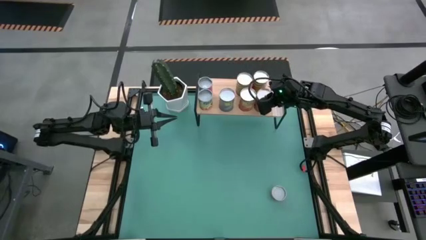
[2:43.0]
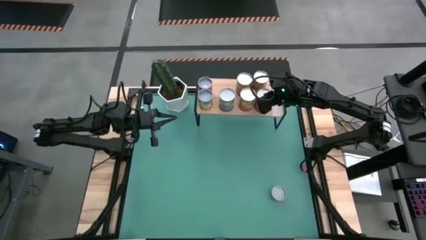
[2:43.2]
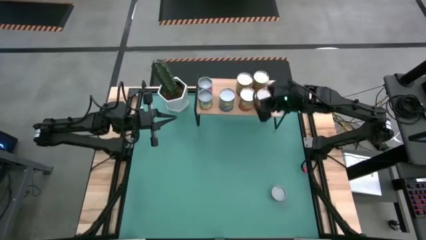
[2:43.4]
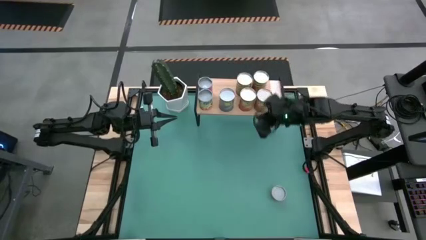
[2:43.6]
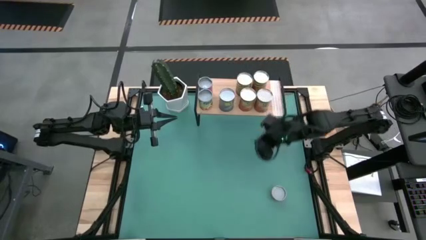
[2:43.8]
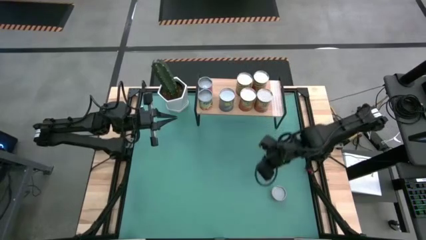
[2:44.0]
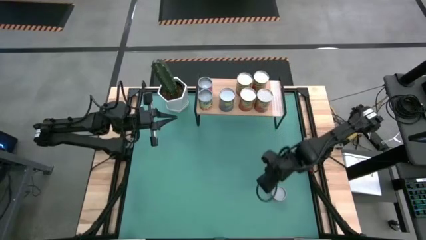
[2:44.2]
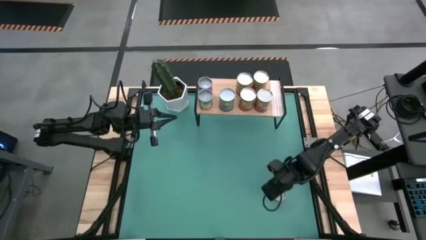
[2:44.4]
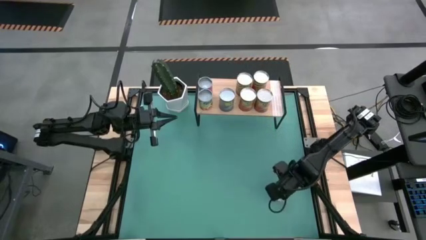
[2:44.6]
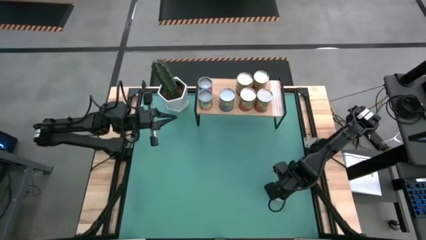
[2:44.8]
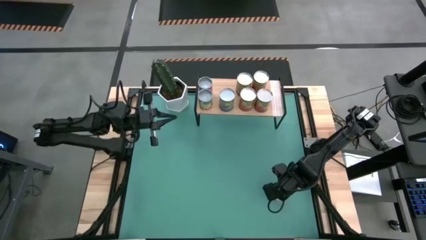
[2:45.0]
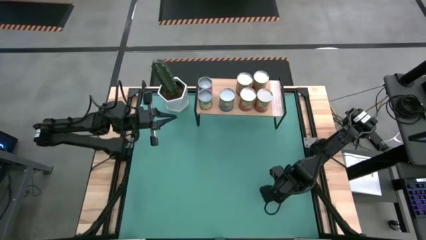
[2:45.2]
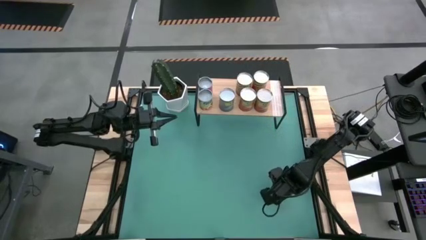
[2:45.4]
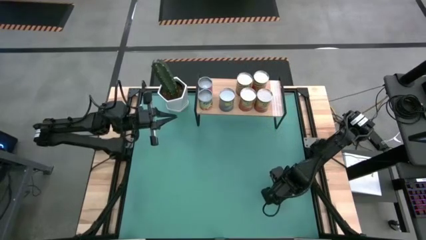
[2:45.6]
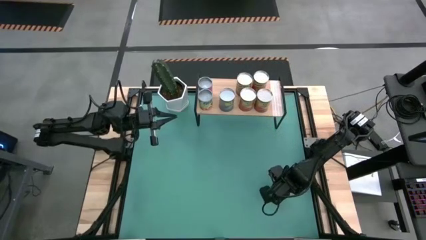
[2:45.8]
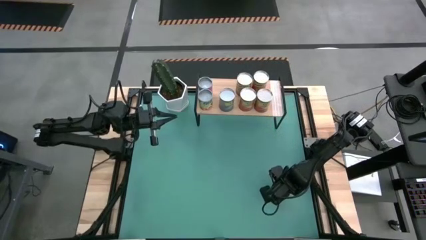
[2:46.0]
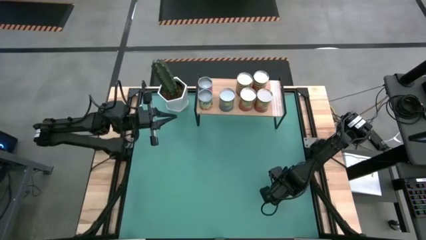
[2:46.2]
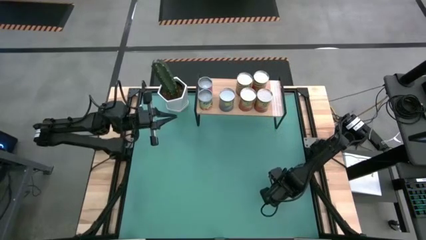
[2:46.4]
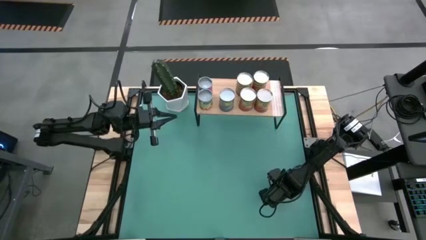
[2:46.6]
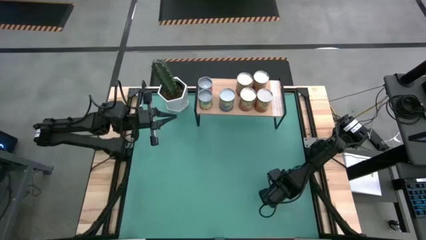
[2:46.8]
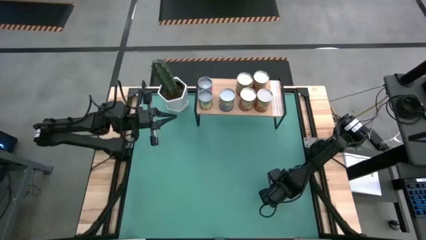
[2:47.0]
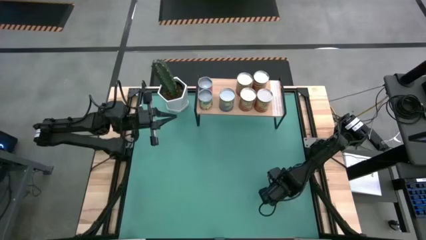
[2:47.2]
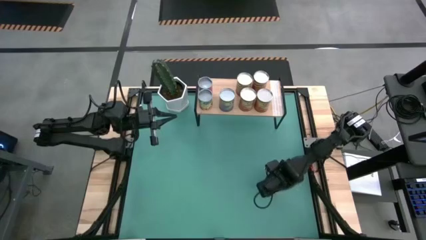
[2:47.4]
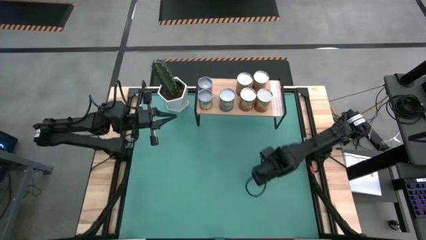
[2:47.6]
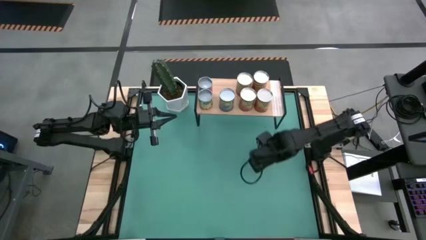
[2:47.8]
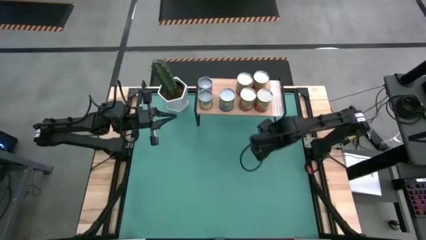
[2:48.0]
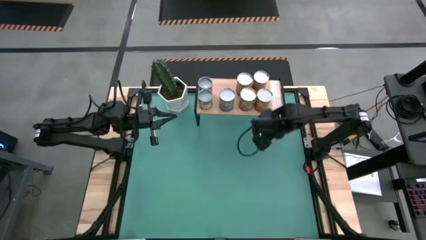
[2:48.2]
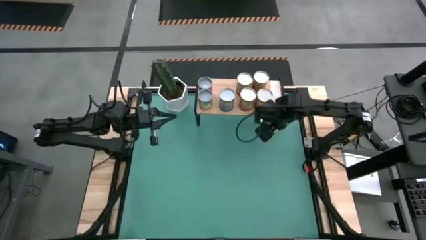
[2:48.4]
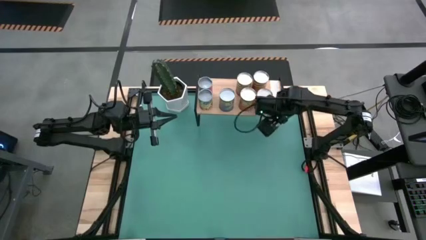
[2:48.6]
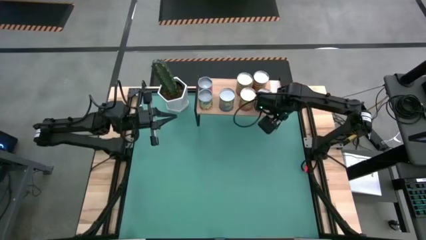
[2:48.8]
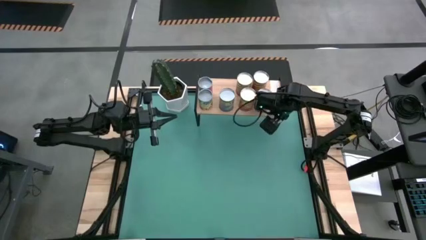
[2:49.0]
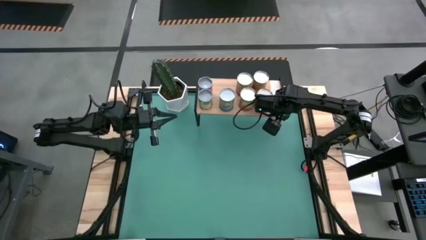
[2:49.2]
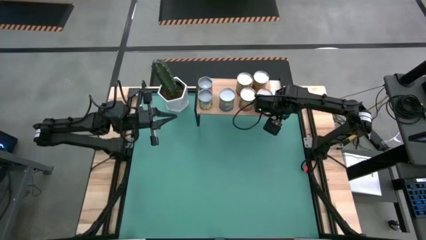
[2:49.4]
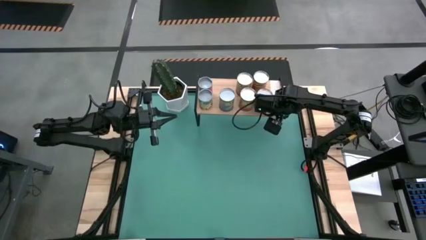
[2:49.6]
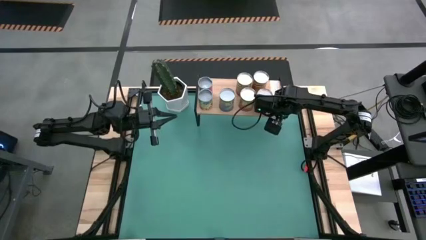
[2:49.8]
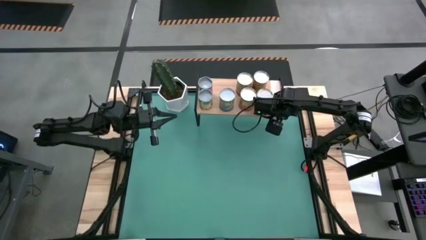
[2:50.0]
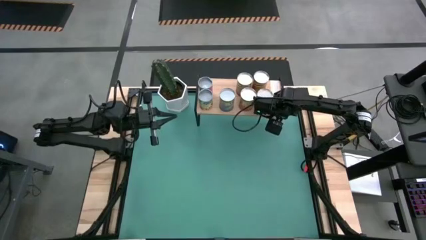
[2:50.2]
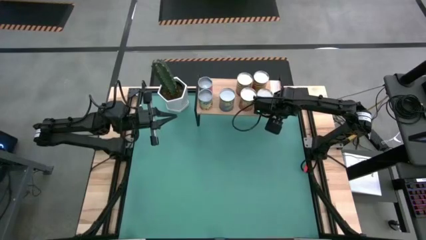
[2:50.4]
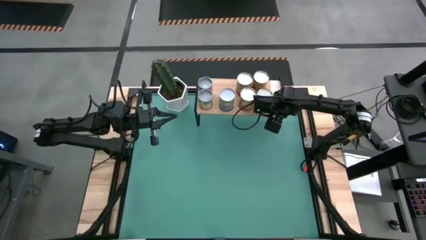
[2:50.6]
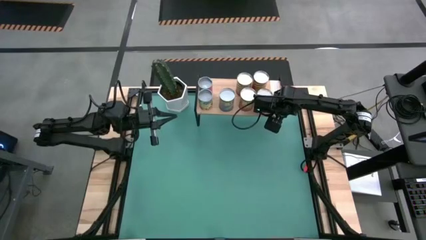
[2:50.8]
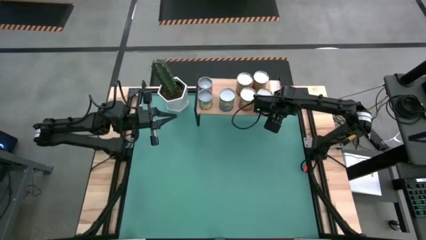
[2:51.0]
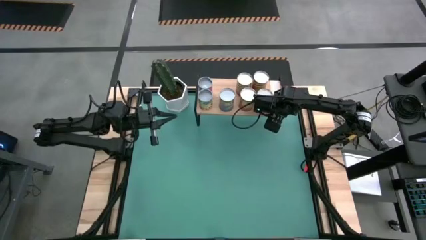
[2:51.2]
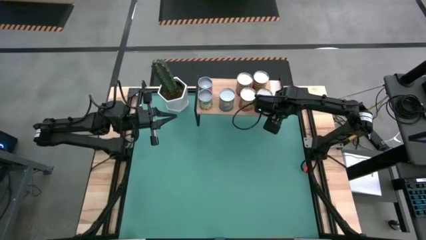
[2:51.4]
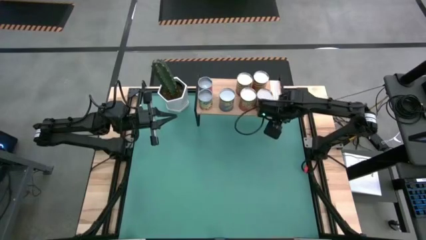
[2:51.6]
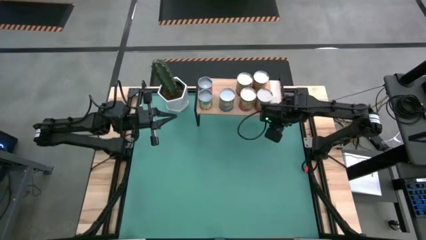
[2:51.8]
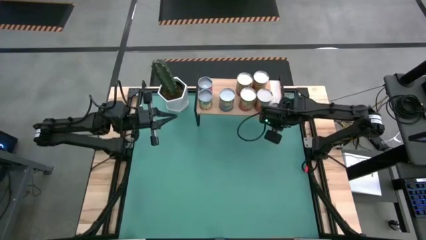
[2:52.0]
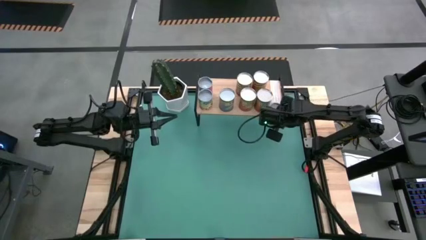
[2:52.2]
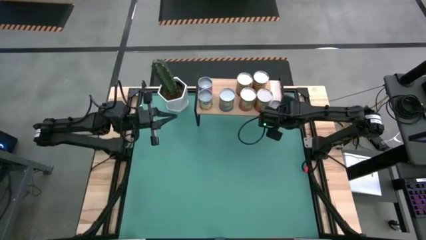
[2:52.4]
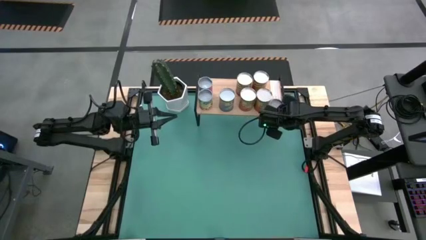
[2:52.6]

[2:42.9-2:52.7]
Task: Pick and place cans onto a shelf
Put the canned pineapple rings on the shelf

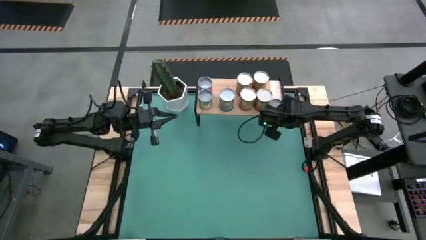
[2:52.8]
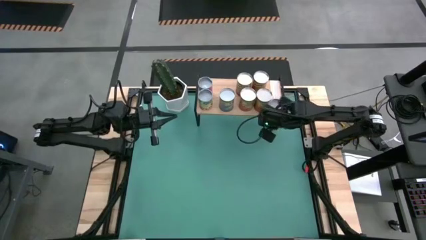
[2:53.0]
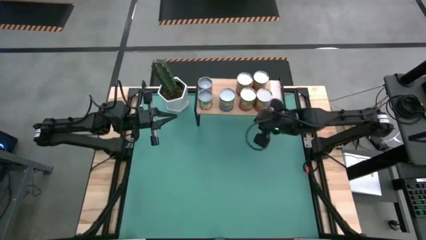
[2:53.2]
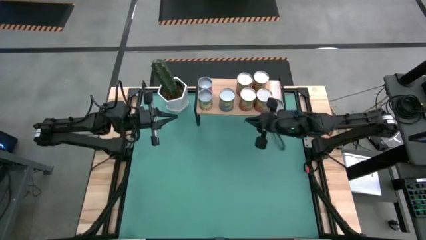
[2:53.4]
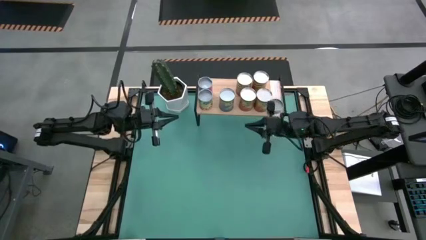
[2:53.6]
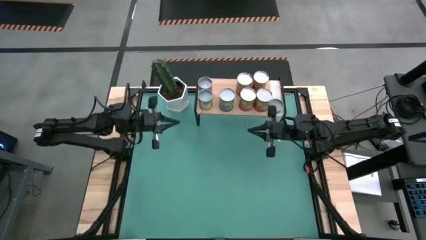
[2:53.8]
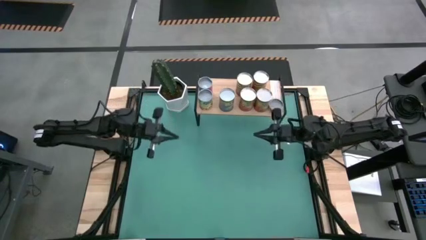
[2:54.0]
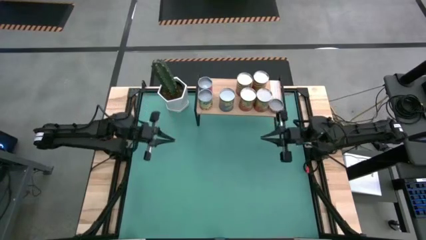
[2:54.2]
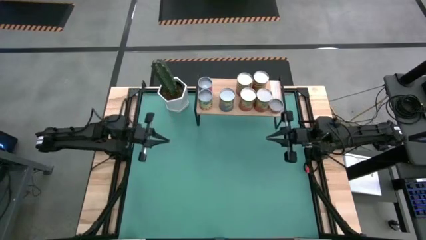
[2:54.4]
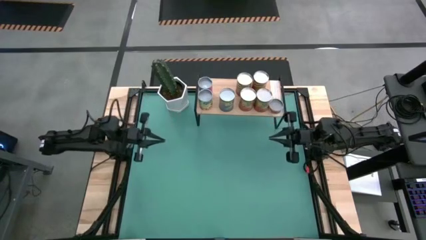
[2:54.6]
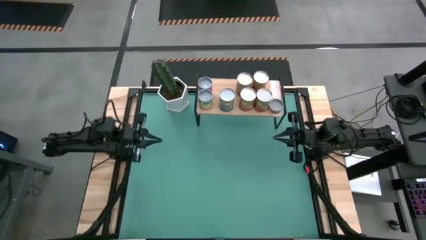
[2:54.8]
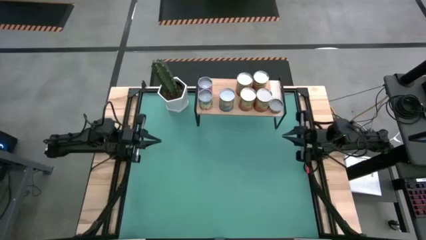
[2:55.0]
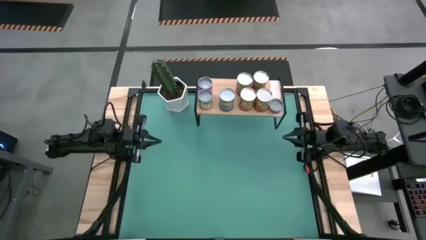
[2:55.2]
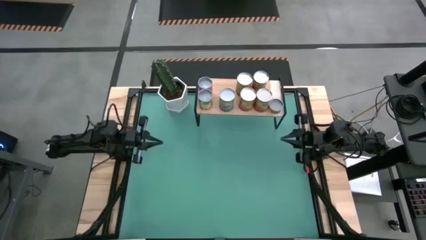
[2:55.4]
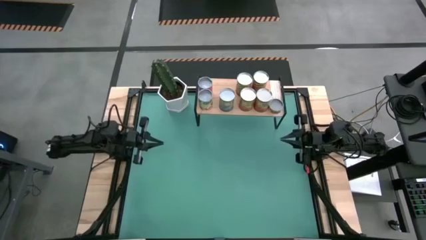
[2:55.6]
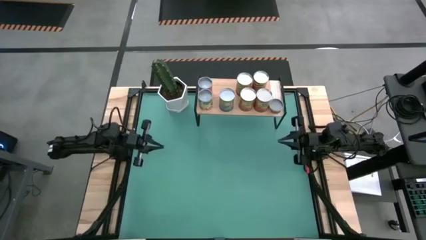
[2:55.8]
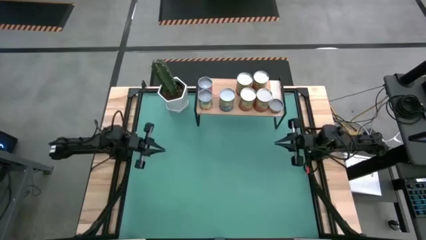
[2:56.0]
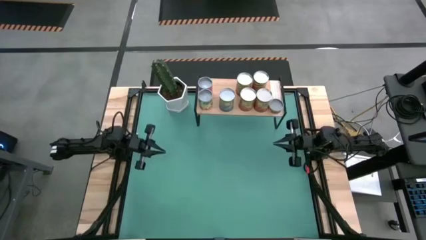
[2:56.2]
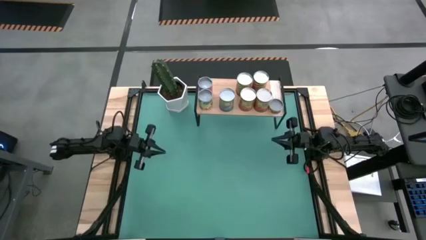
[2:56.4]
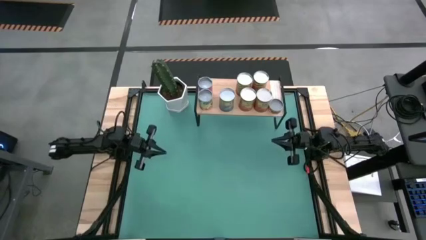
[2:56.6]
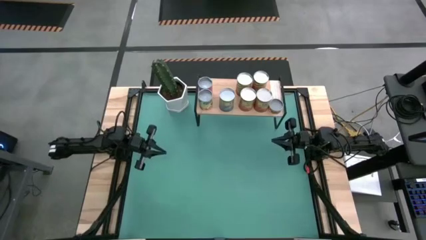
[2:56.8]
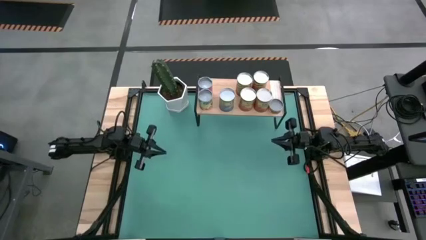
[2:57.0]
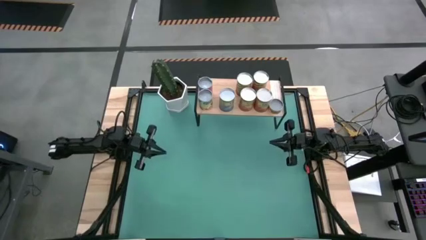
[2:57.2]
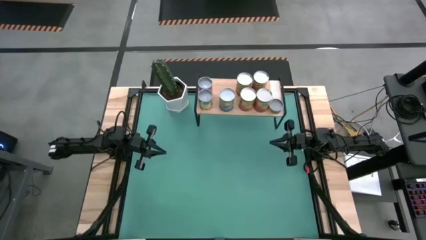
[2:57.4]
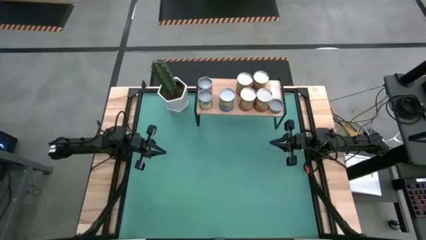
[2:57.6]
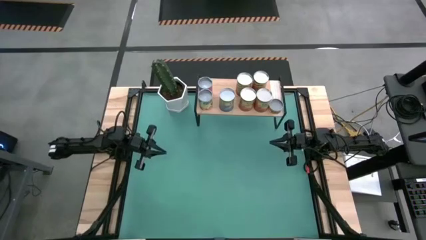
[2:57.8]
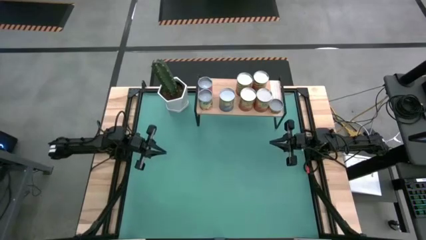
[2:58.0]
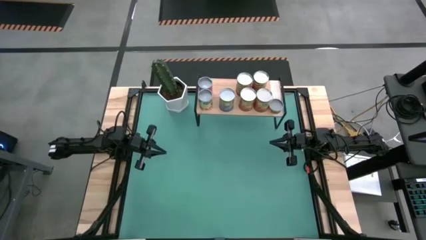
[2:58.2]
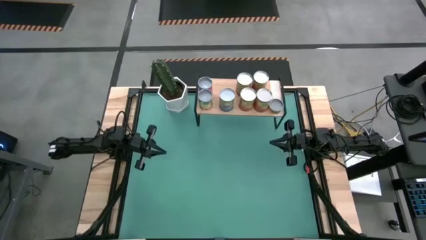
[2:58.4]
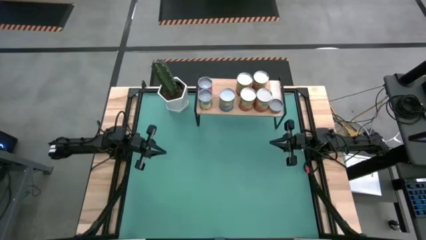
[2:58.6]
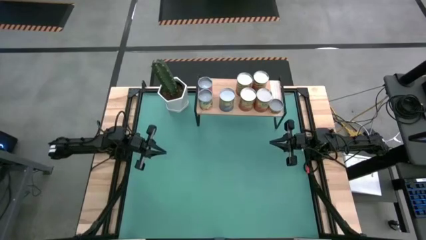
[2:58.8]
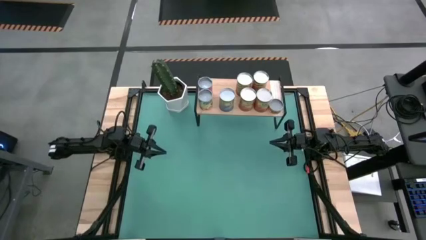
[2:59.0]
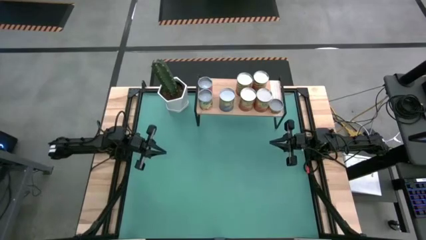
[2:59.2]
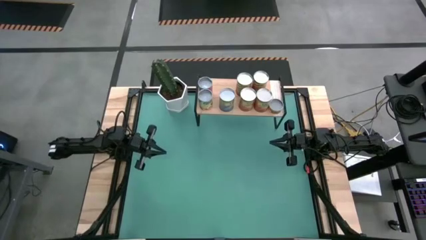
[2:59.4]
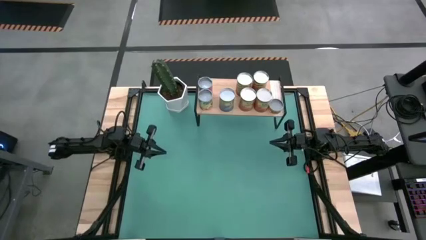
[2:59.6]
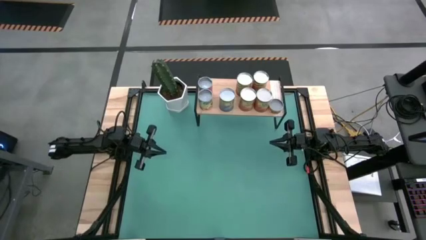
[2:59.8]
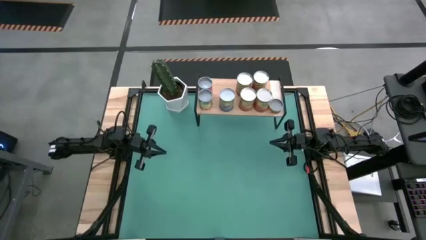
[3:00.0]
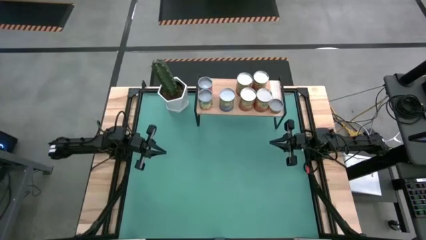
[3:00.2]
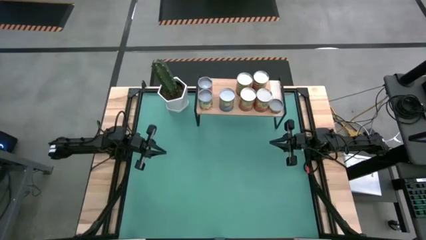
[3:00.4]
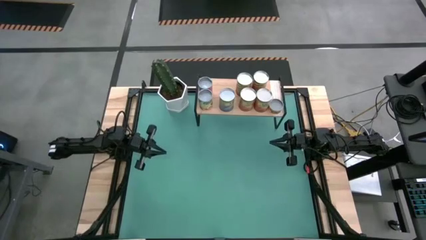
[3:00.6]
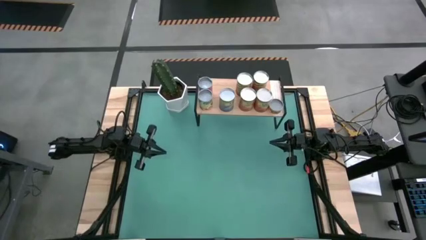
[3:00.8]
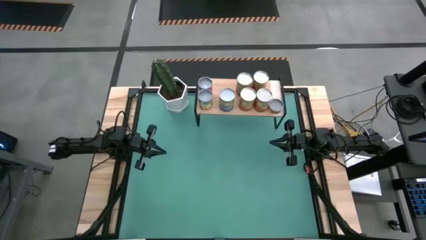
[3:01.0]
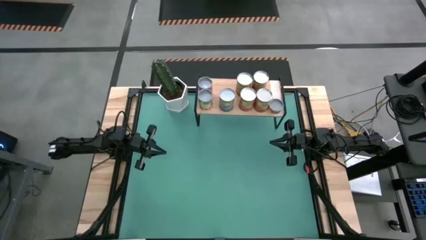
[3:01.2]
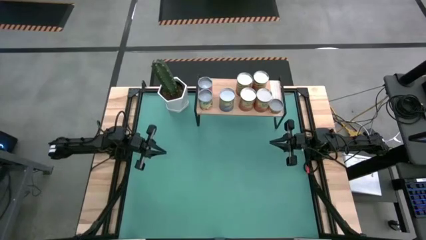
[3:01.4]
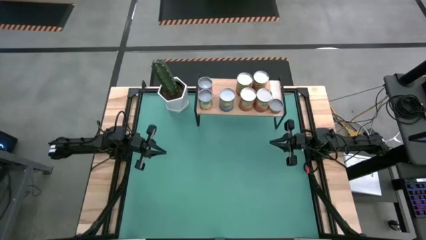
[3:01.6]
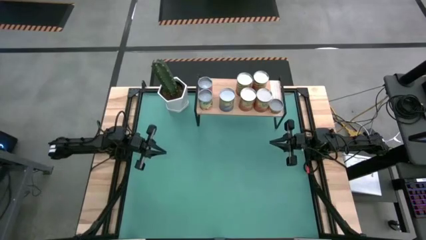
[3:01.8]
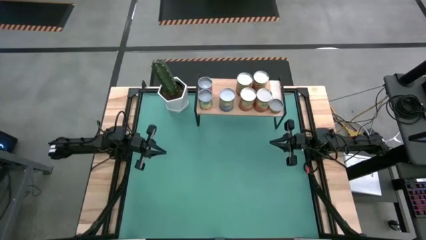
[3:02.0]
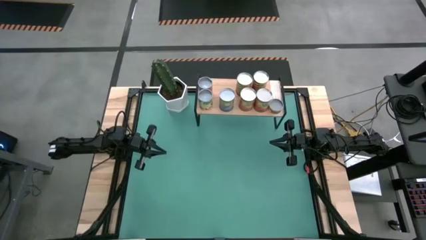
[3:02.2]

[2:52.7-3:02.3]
Return to Home Position
